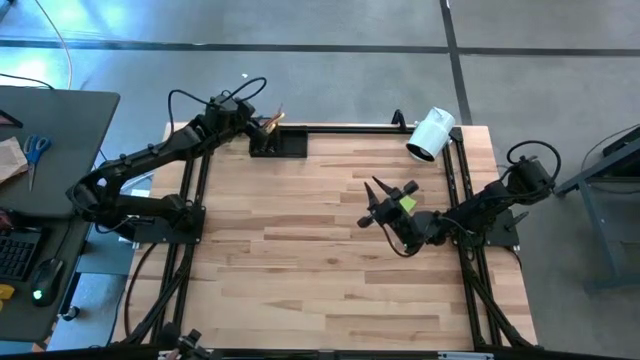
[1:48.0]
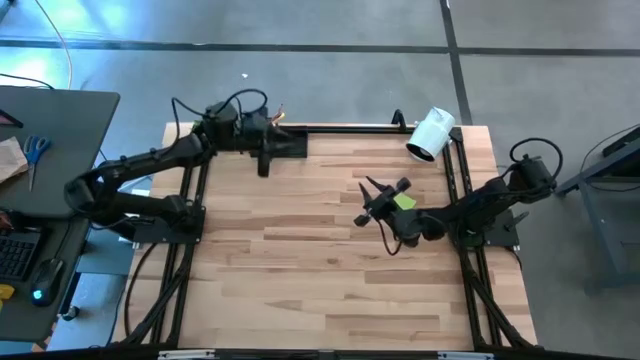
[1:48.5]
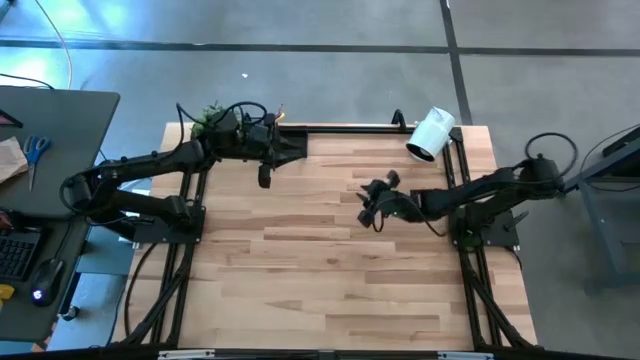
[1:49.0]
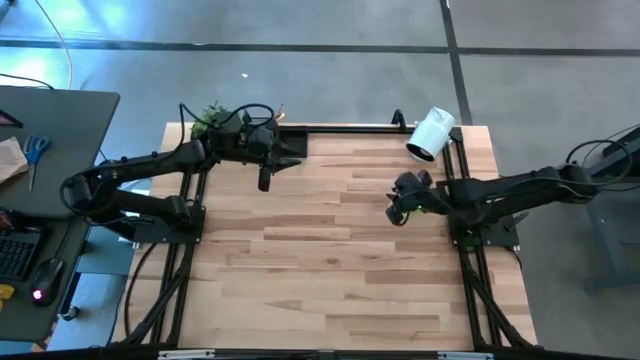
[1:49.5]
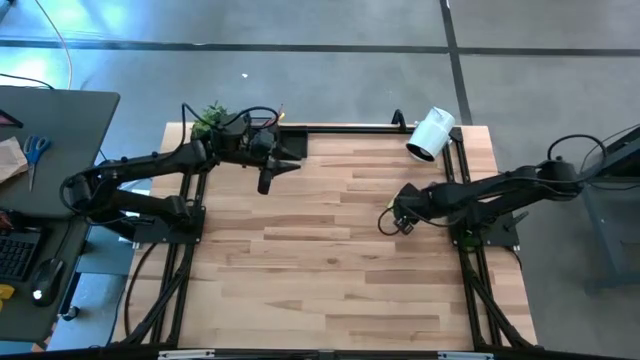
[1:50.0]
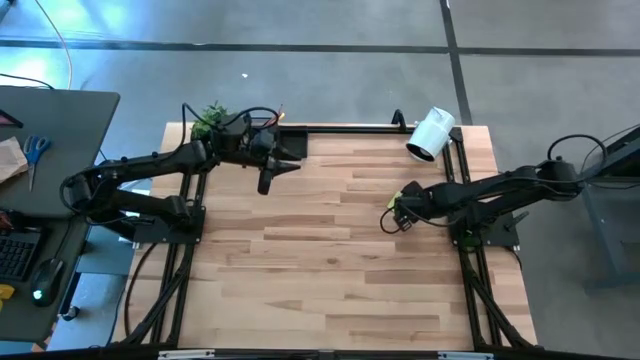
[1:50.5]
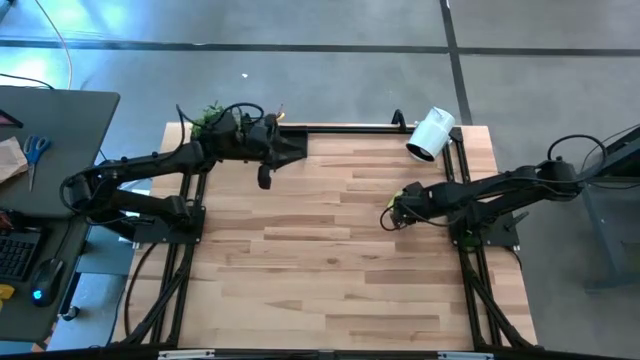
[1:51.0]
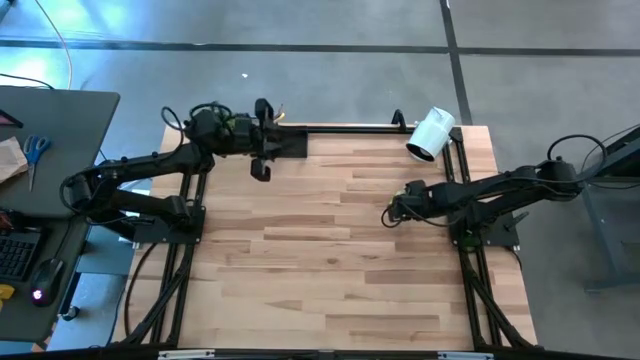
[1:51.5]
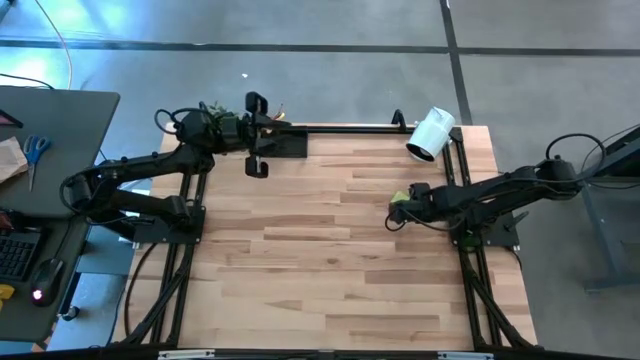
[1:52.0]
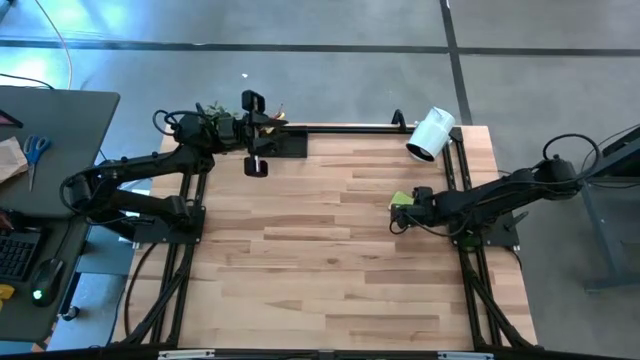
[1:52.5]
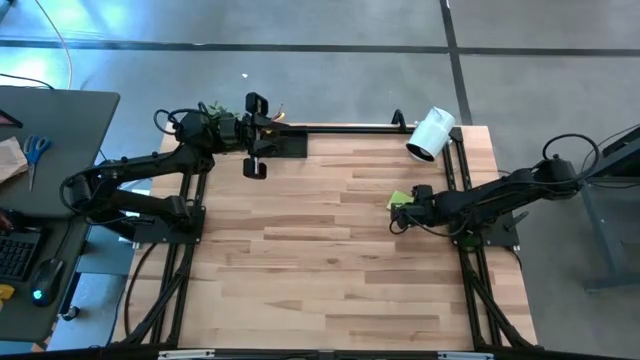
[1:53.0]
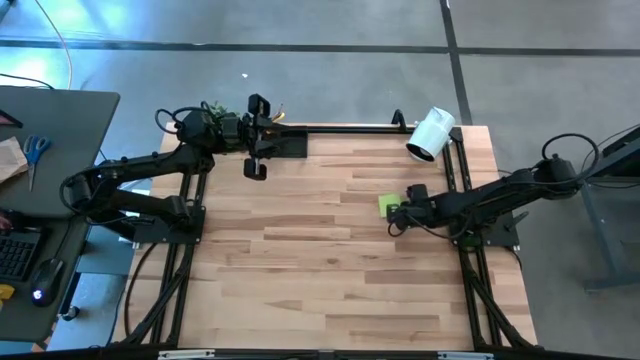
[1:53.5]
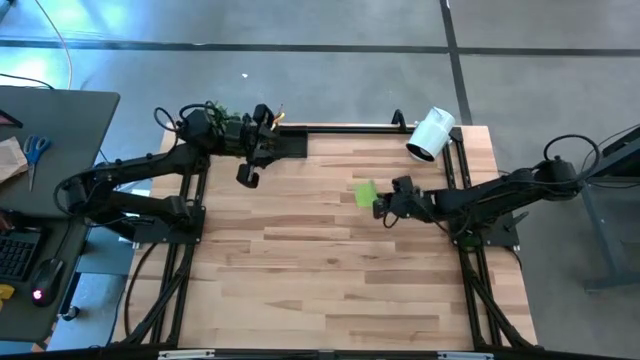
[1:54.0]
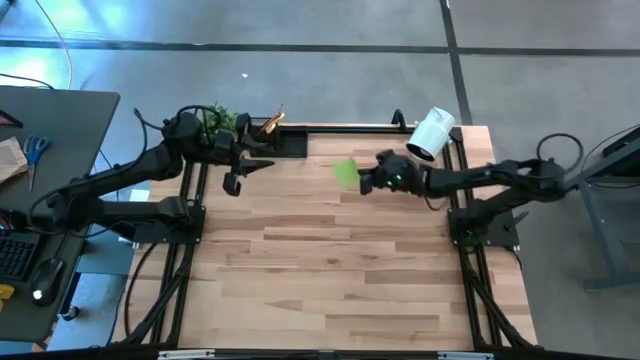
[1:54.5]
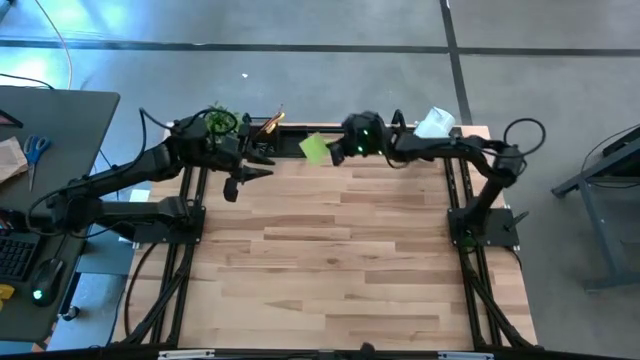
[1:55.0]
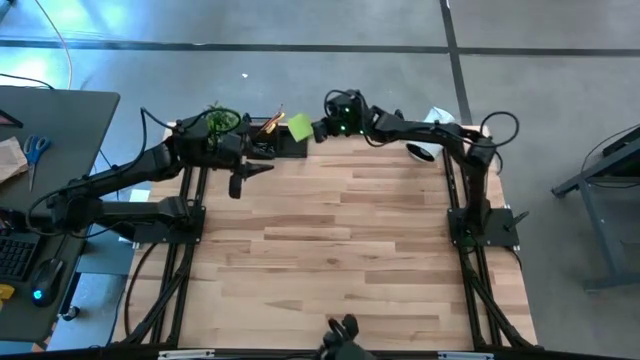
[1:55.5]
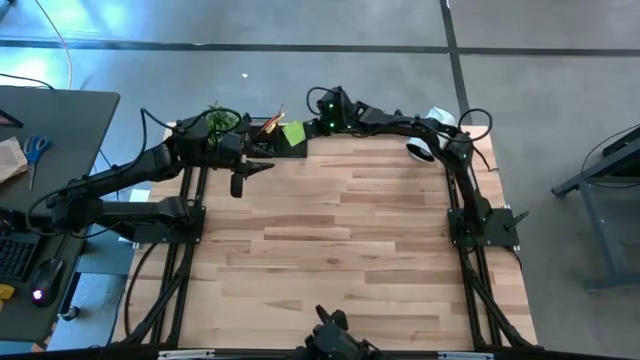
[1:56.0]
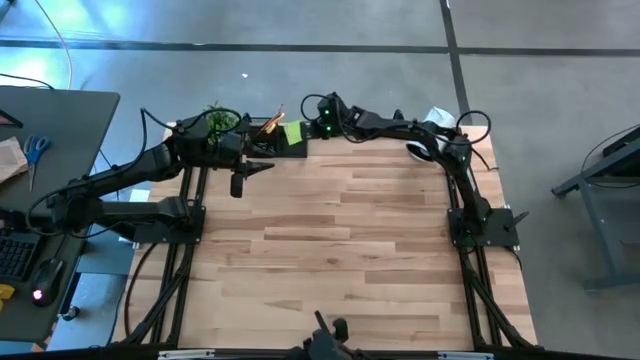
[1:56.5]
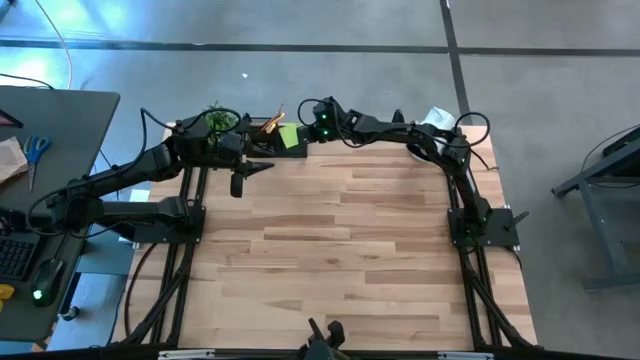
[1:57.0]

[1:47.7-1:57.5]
Task: Pick and place office supplies into organizer
Put the green sticky note into the right section of the desk organizer

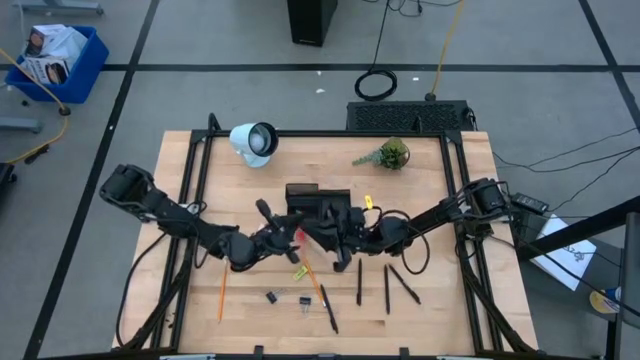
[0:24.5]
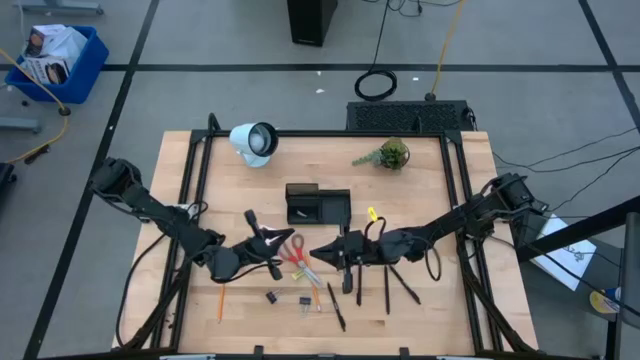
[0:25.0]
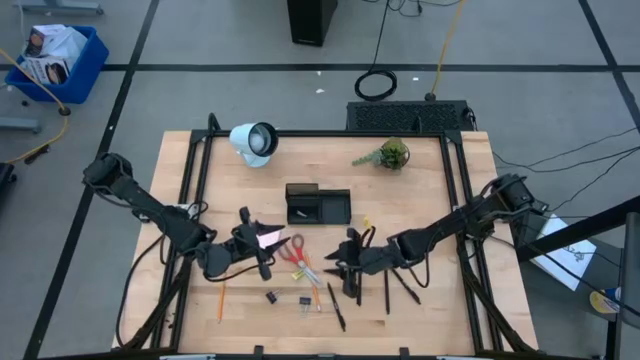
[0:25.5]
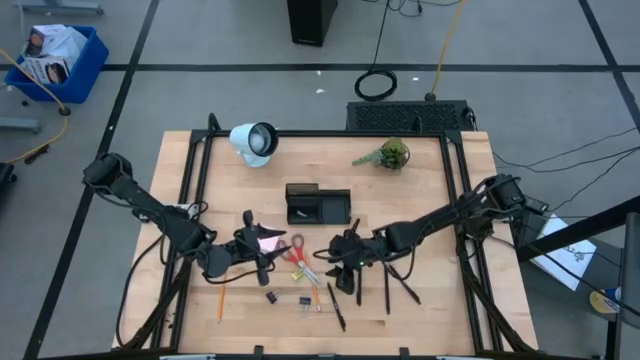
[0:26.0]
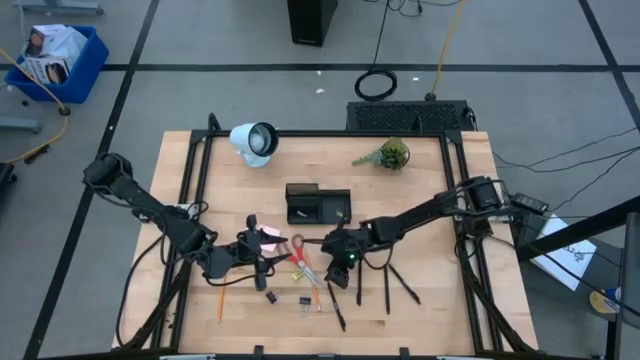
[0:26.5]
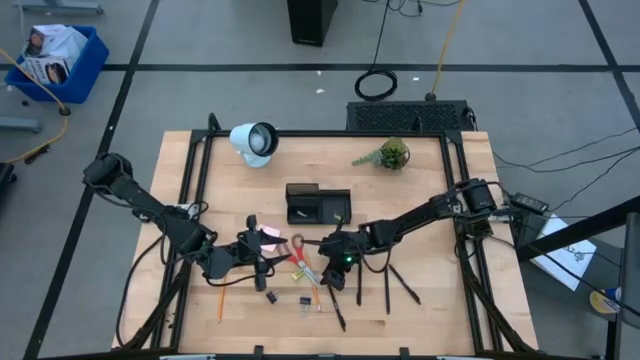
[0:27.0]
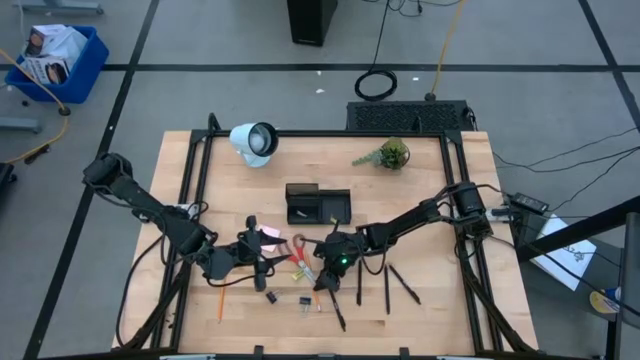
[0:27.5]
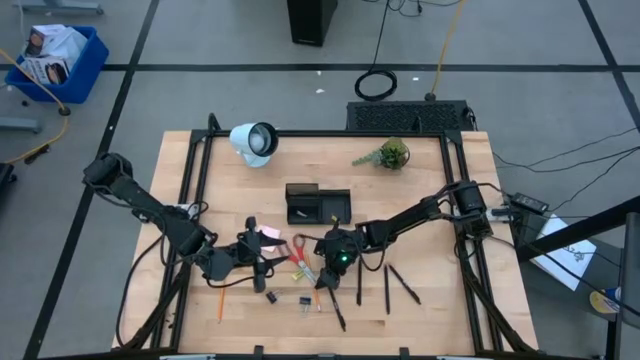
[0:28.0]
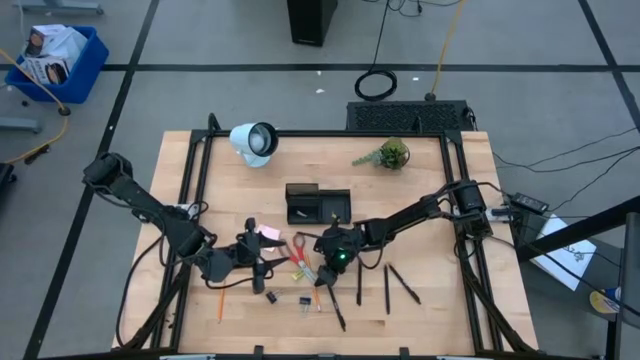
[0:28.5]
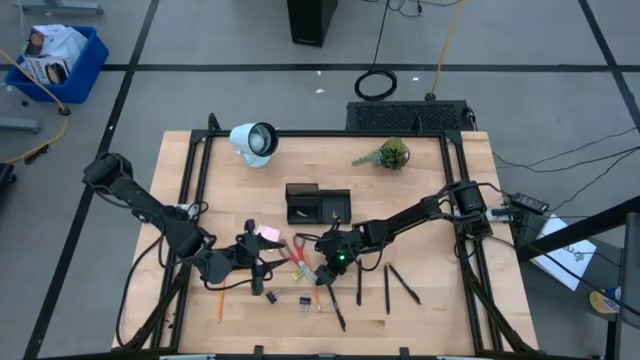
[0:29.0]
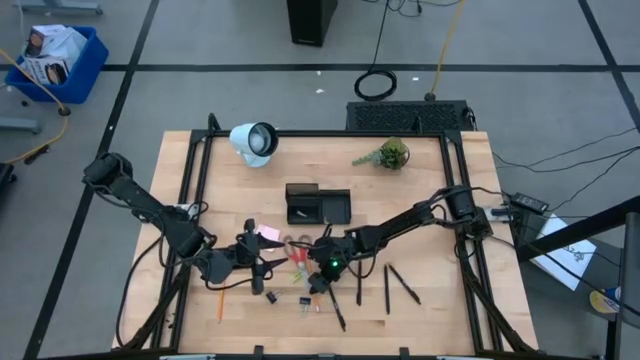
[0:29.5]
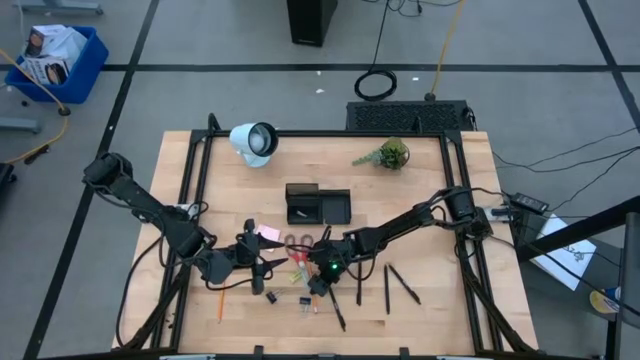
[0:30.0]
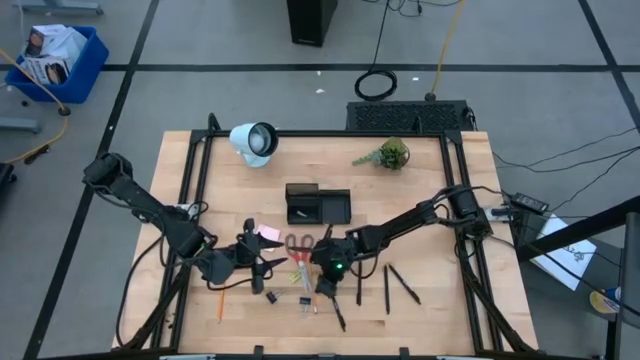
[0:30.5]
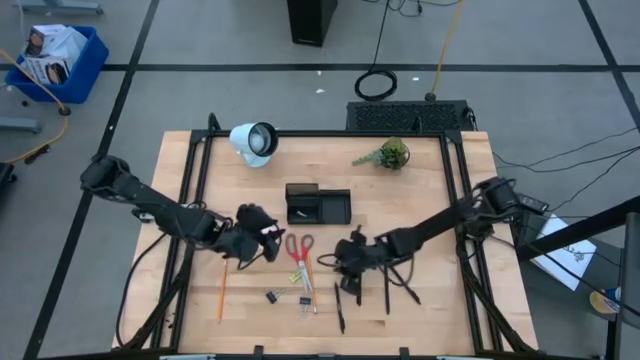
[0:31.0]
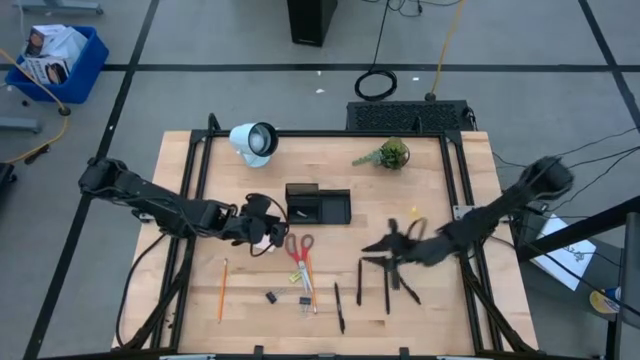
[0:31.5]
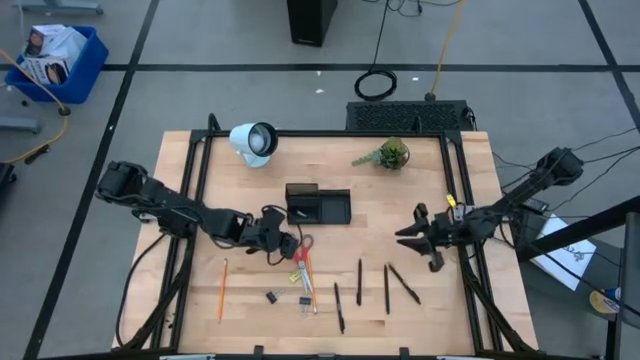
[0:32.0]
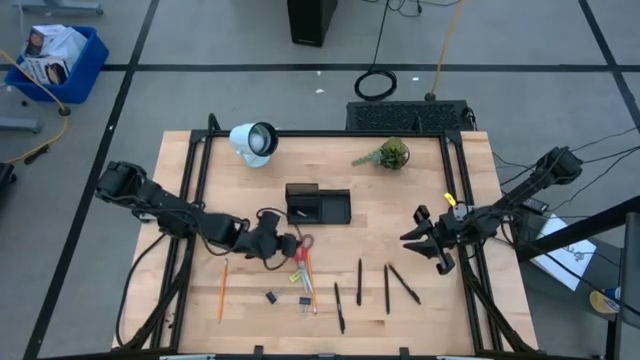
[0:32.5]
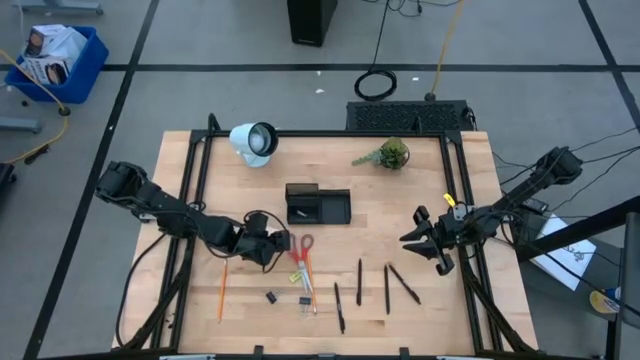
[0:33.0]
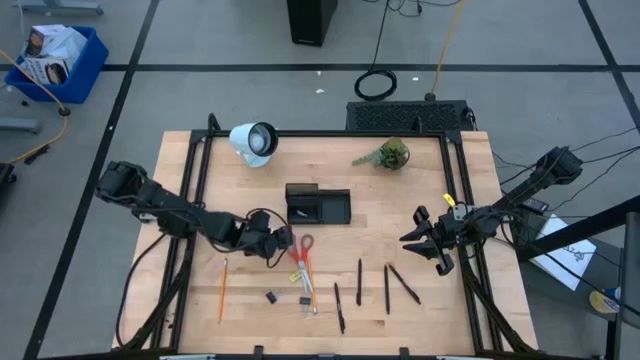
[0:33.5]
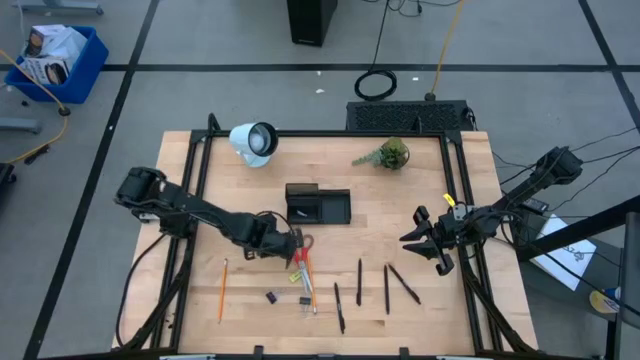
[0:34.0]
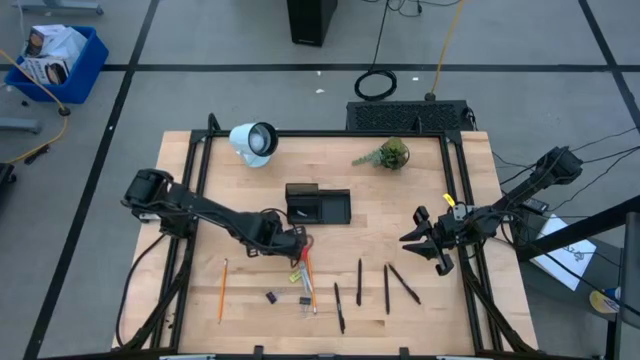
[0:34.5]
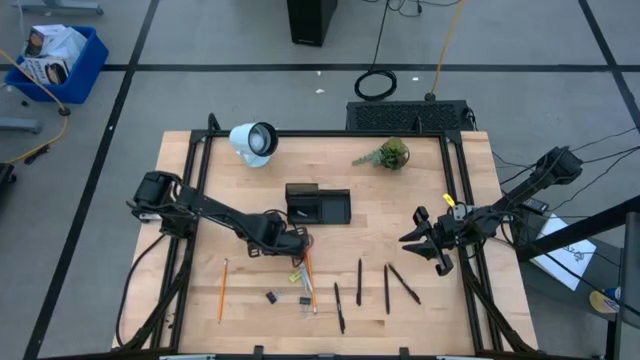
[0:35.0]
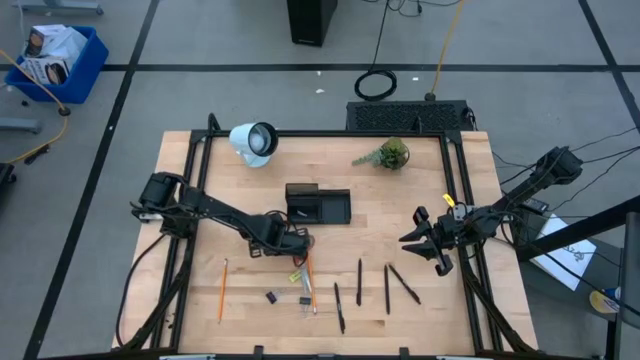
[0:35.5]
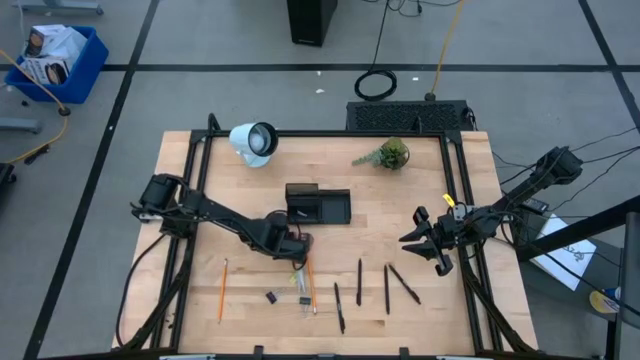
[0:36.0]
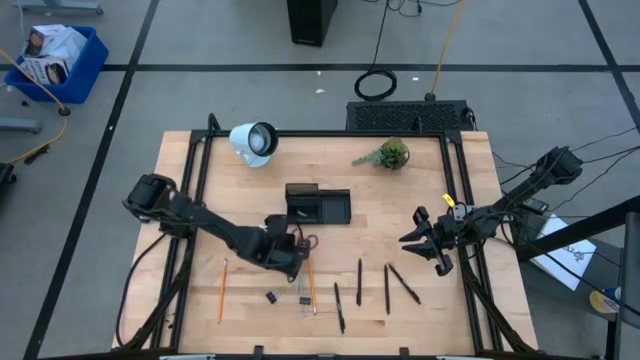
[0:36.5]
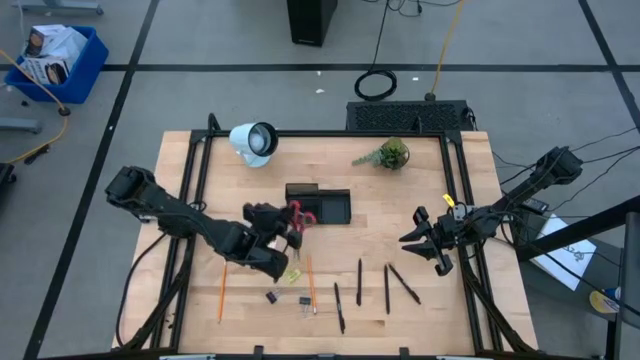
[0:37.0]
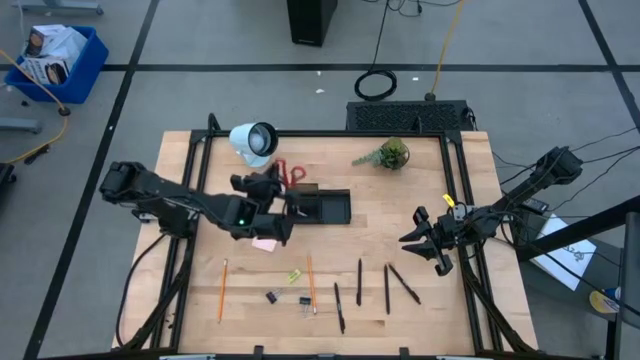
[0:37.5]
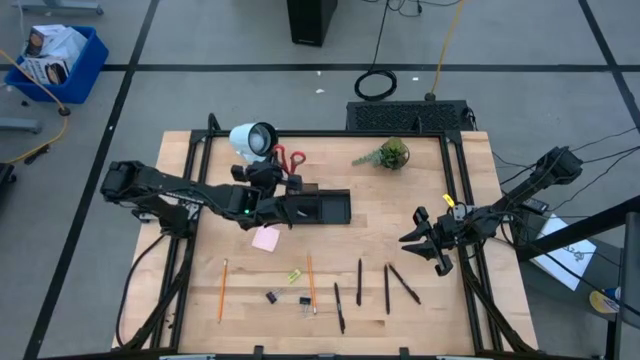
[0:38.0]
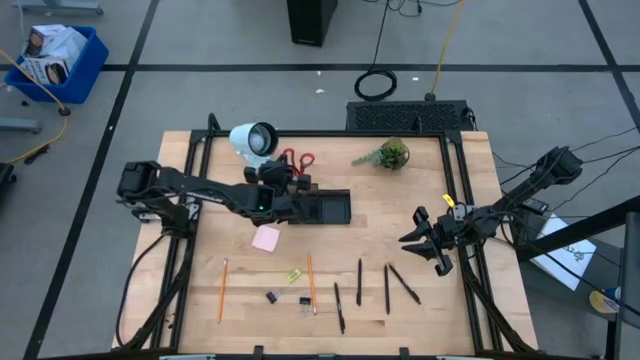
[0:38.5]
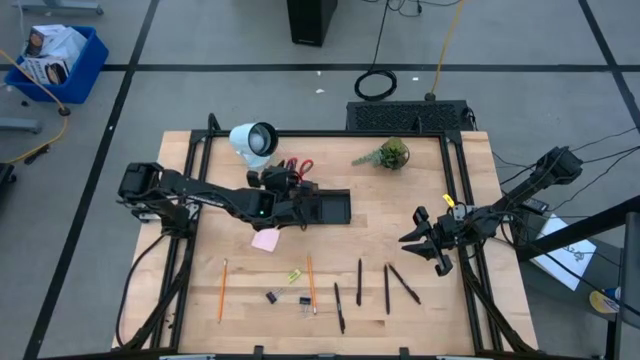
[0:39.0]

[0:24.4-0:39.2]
Task: Pick and place office supplies into organizer
Put the red scissors into the black desk organizer
